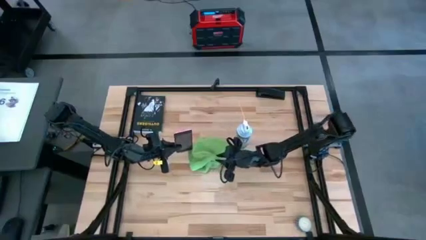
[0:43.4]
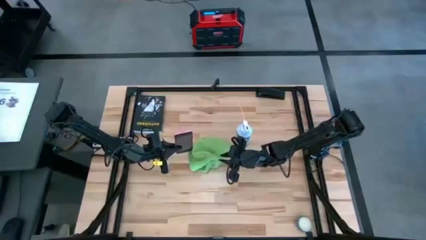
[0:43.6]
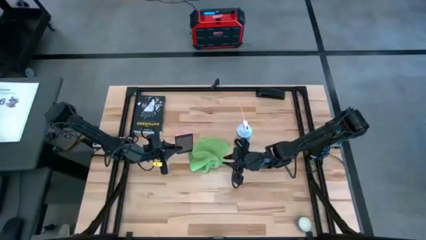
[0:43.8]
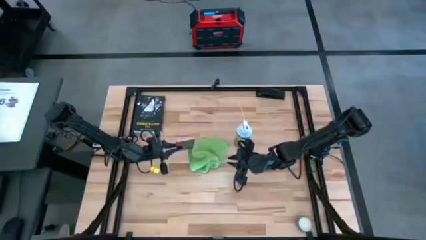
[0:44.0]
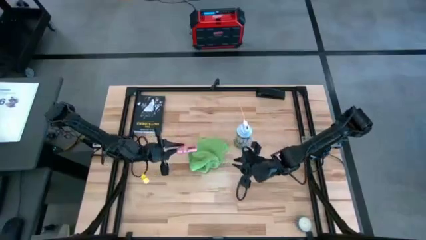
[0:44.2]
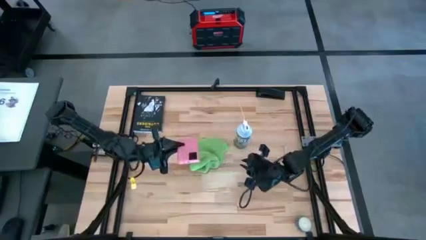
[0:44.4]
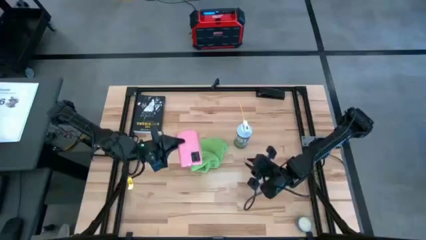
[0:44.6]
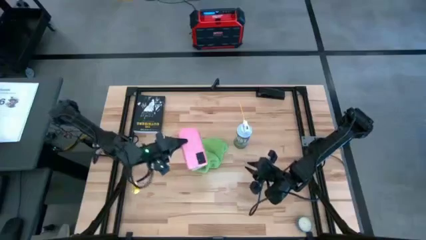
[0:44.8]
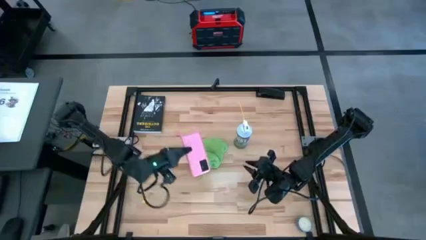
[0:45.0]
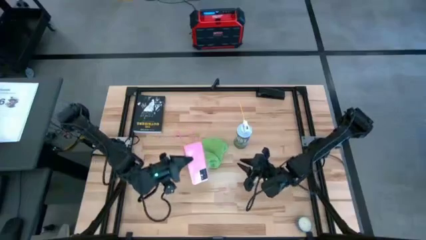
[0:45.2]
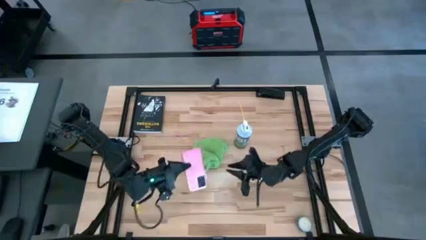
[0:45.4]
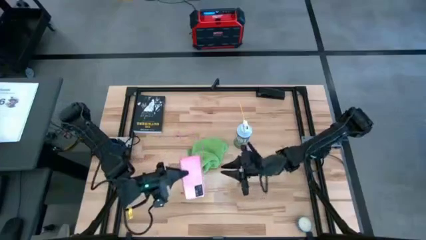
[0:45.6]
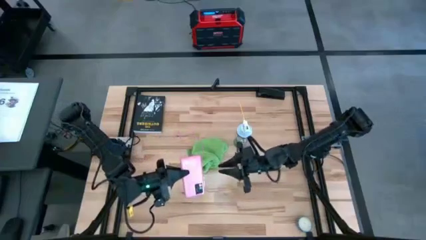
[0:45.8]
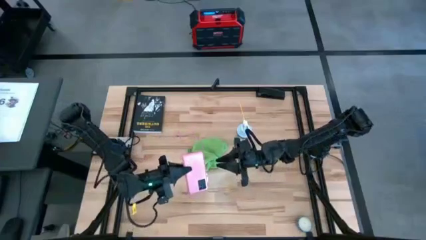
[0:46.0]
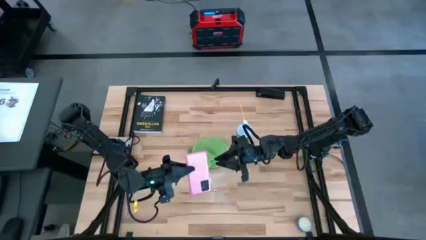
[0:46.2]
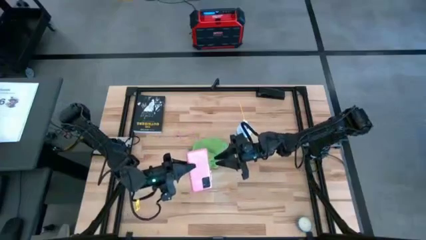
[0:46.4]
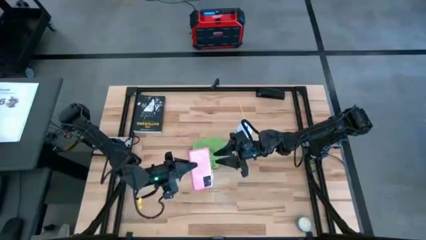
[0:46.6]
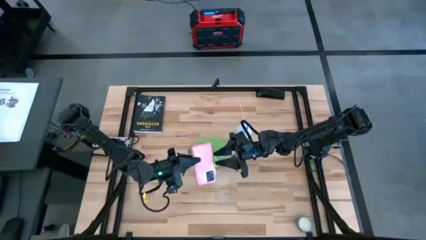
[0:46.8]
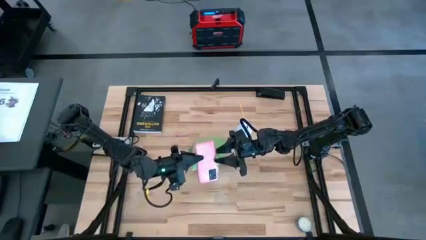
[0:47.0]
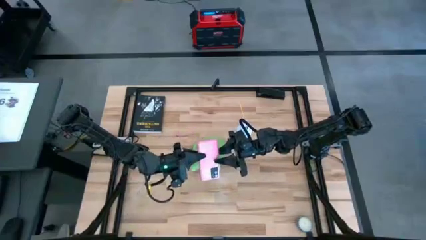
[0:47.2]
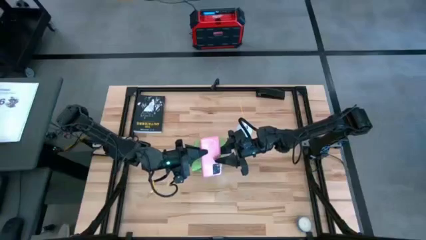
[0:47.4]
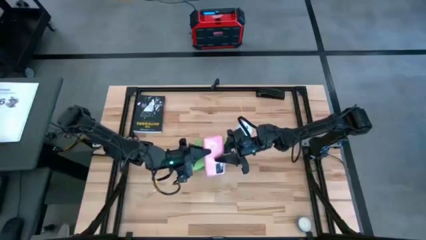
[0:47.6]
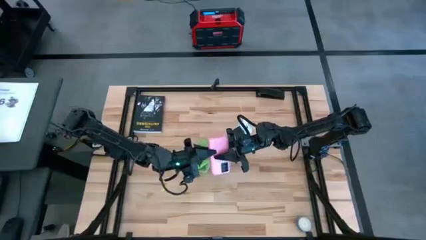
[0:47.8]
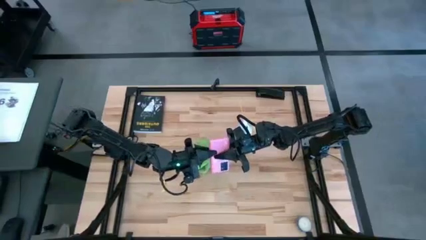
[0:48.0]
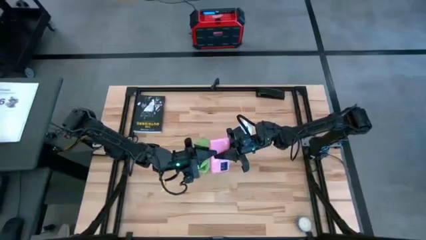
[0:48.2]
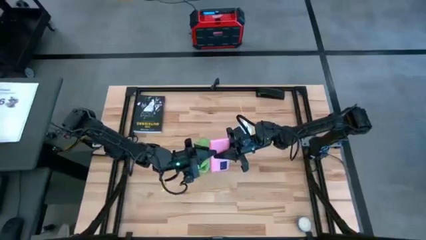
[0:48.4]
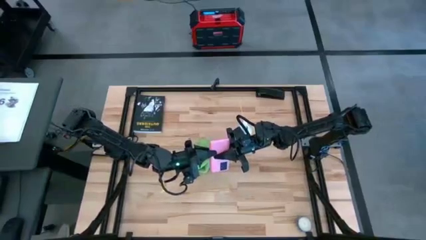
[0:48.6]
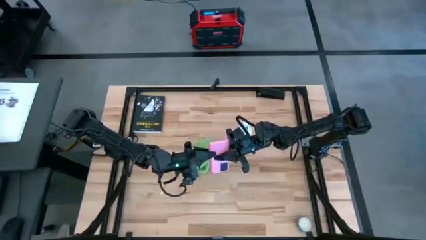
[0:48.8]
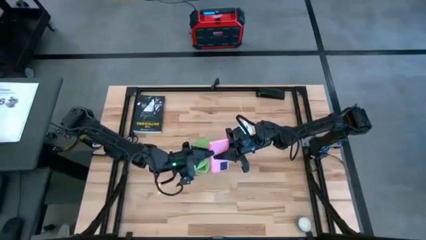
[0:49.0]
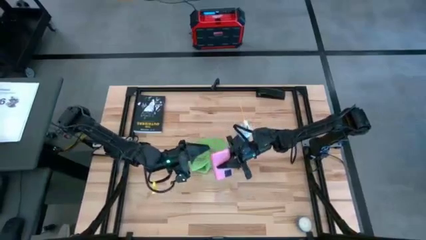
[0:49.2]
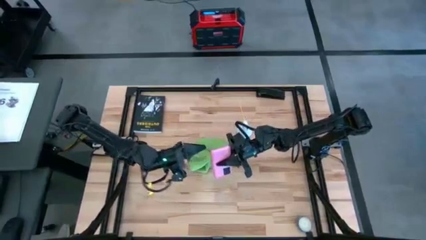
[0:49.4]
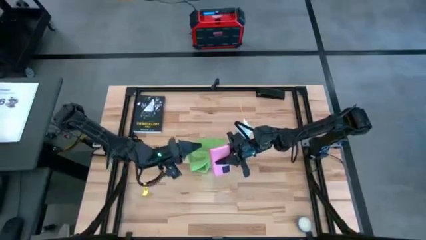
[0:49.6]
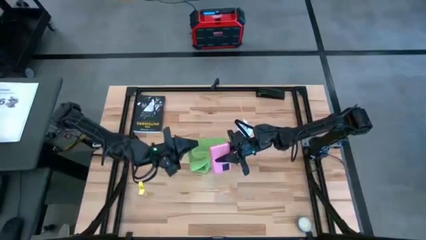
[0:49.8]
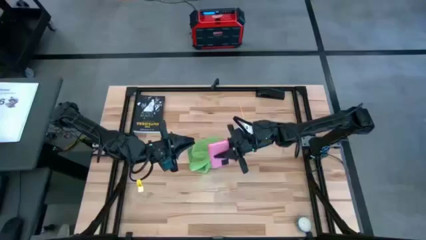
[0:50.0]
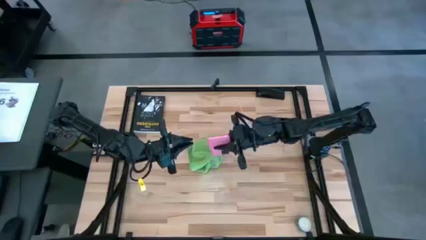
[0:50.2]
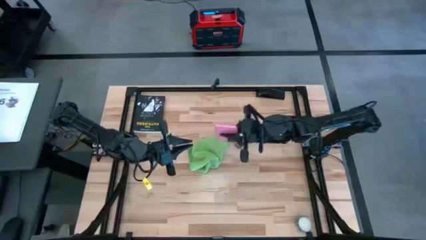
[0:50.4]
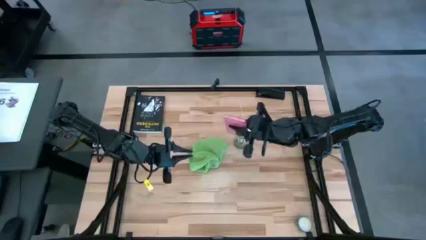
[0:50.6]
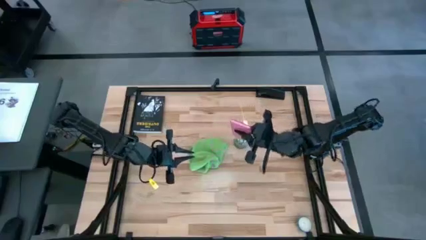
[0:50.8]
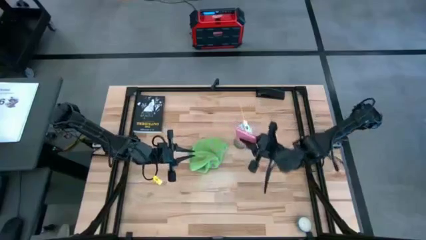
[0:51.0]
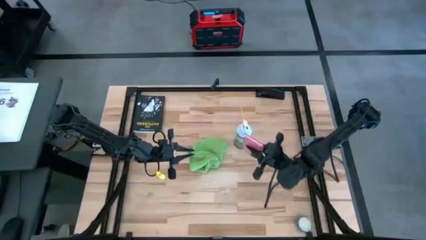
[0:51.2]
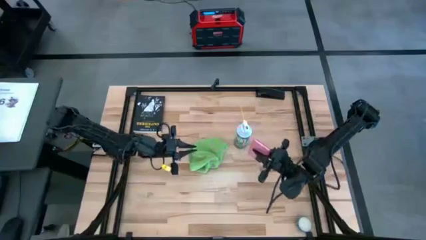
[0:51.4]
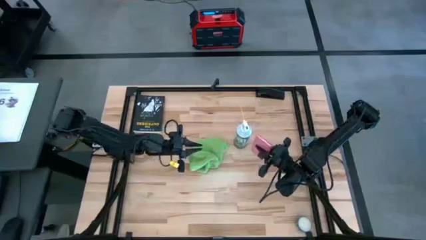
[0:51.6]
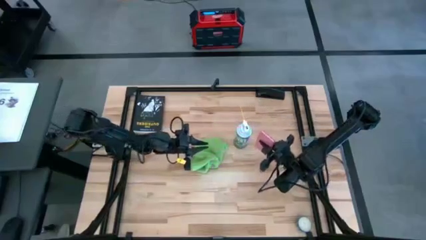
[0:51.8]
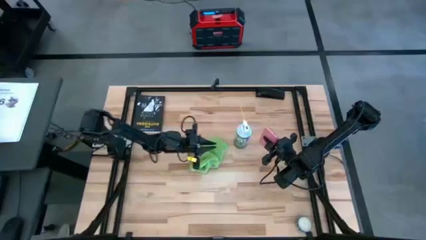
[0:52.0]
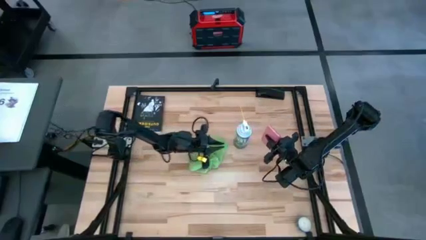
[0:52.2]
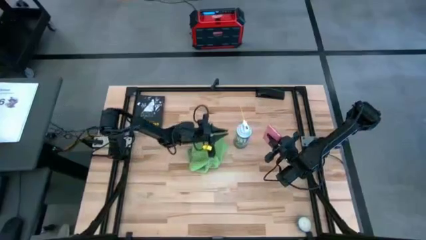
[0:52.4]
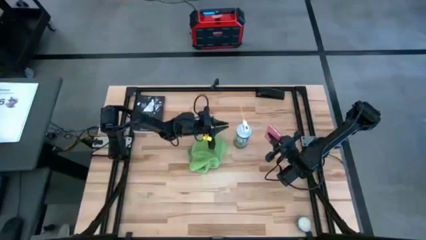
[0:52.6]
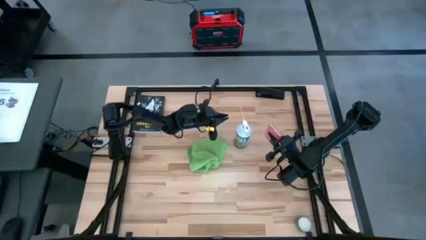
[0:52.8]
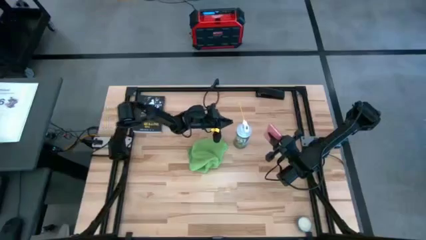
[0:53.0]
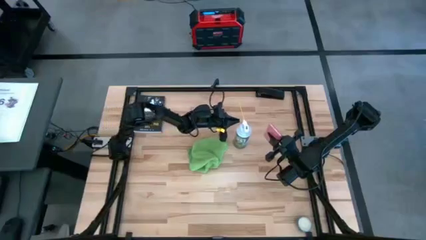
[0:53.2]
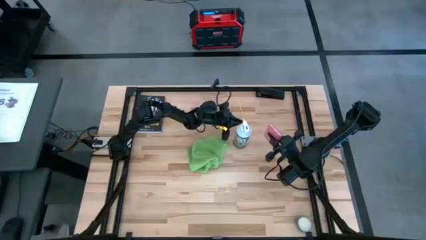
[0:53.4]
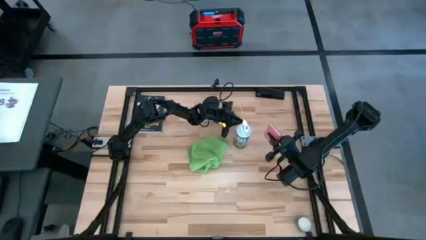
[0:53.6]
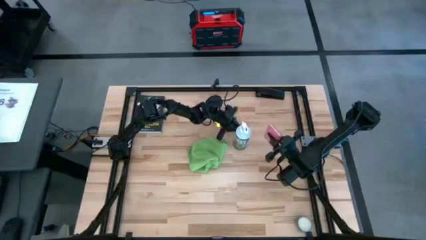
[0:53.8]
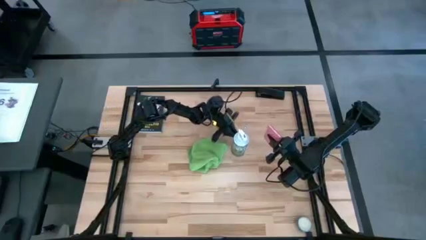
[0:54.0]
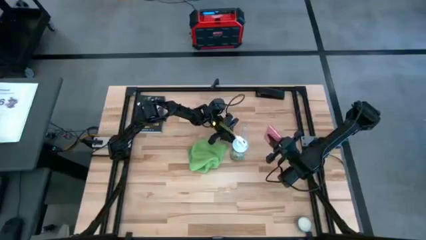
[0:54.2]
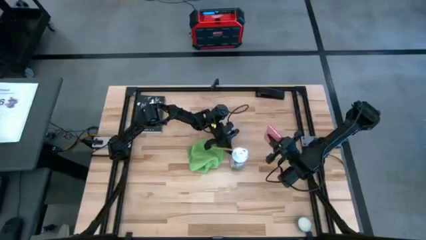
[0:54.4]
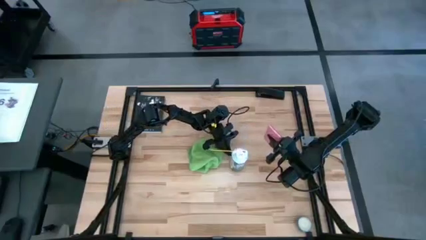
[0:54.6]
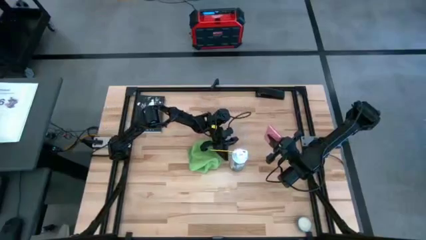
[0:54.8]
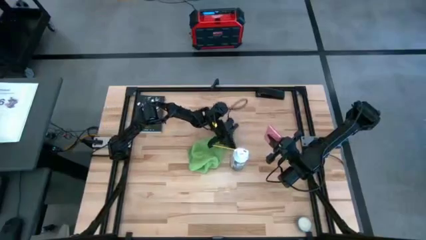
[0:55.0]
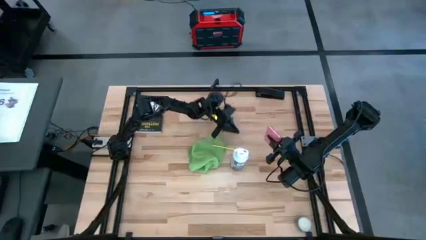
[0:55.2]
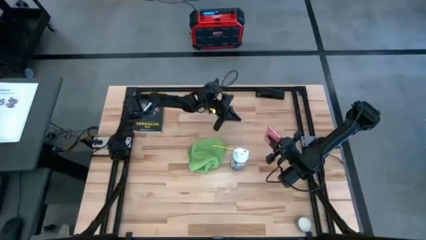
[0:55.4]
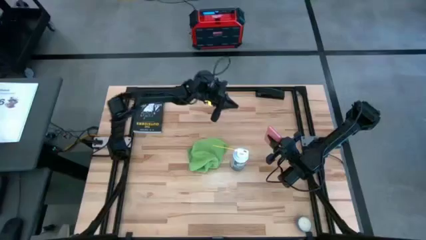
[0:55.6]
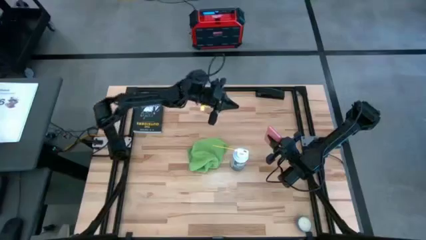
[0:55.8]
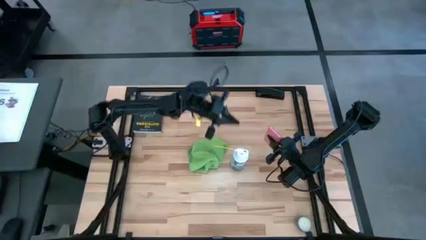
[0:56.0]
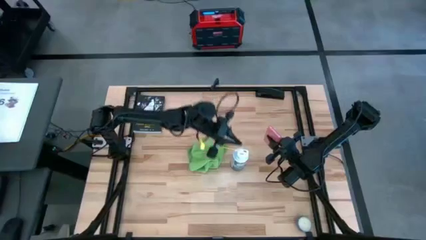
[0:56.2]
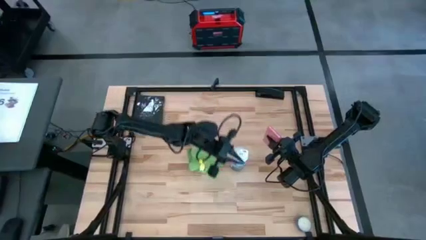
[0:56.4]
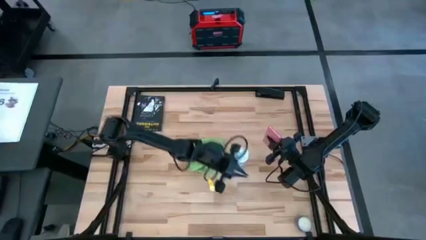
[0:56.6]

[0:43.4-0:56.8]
Task: Apply microfiber cloth
Spray the pink cellphone using the spray bottle

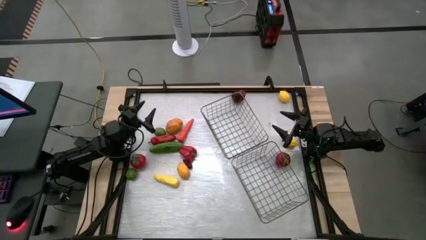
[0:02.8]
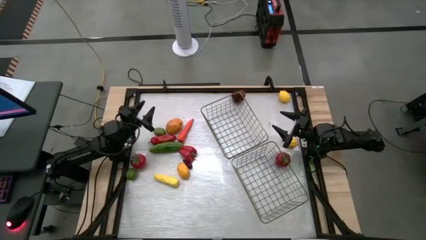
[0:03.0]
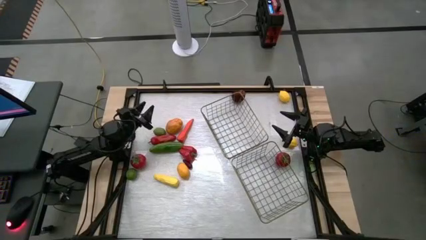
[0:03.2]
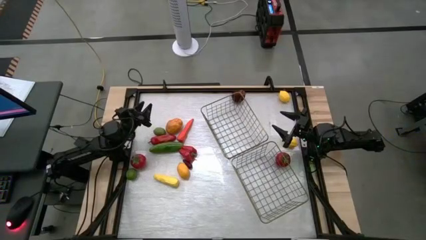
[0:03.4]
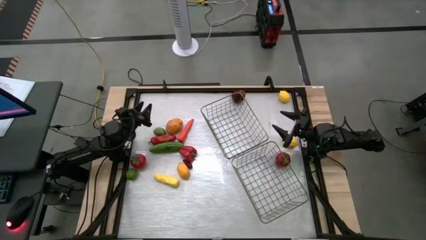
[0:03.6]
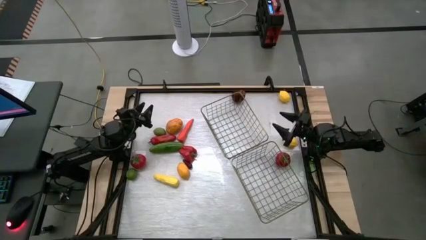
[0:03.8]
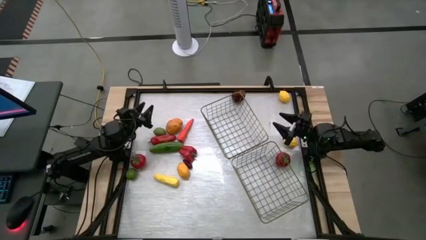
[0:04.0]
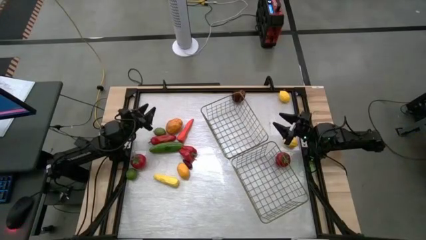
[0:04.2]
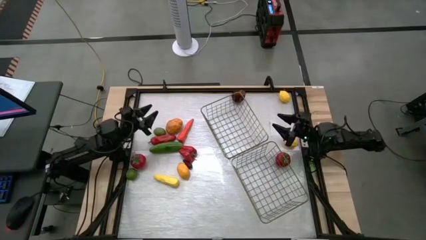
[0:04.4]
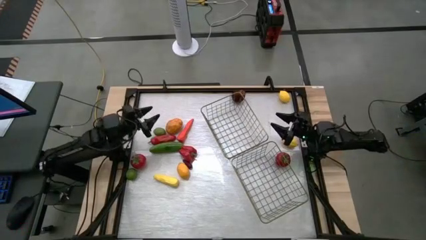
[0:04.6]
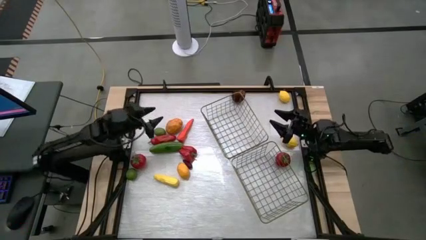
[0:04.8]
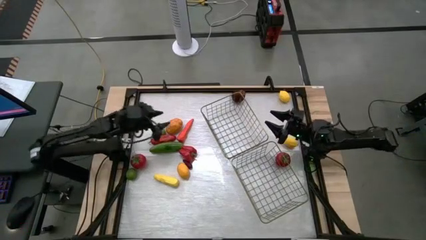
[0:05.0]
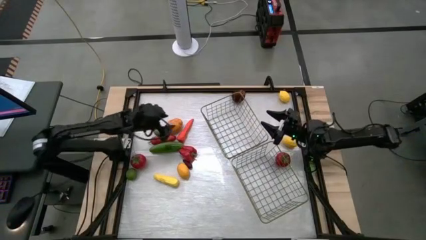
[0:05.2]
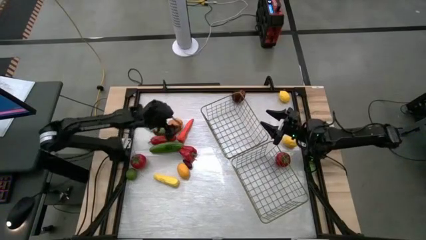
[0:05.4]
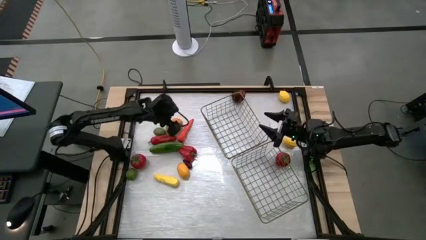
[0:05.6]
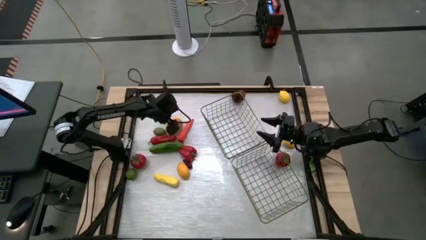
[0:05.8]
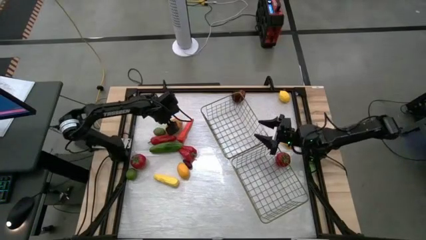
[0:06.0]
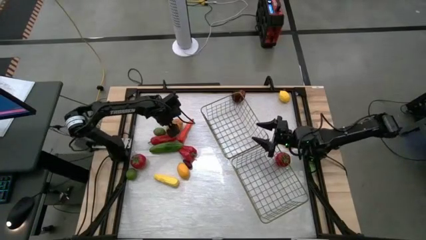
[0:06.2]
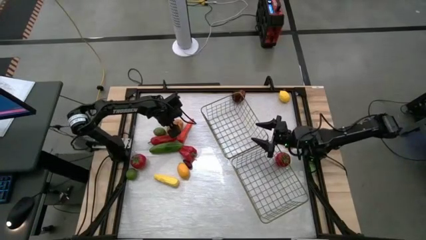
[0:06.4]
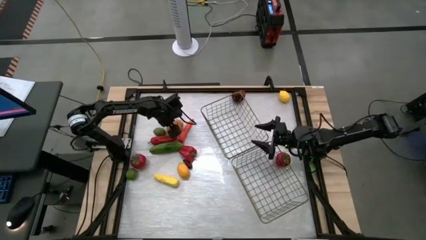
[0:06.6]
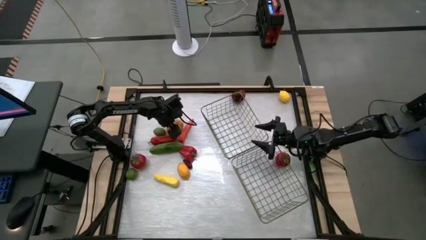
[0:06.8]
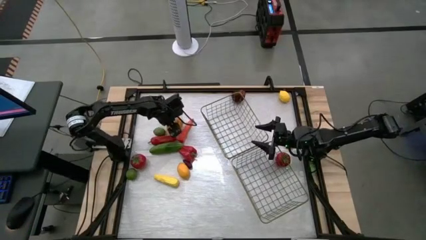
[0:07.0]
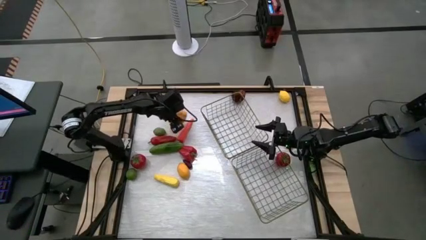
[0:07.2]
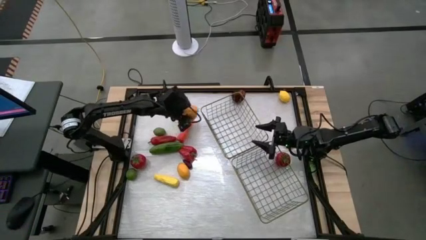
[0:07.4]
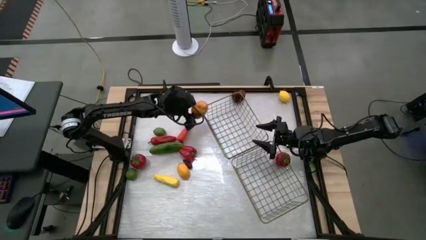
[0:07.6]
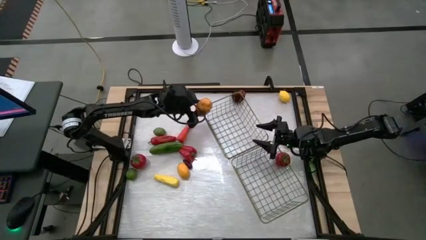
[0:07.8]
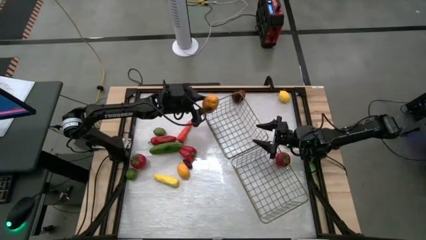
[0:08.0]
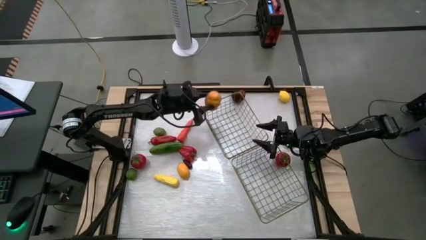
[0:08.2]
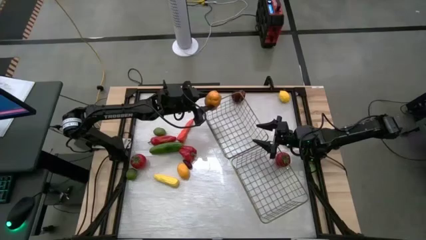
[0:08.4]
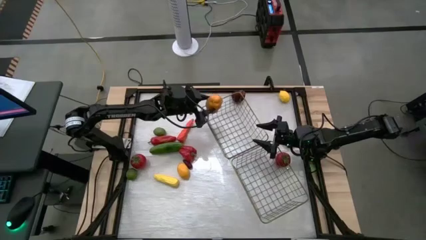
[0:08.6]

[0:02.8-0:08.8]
Task: Sort produce into baskets
Put the potato into the left wire basket
